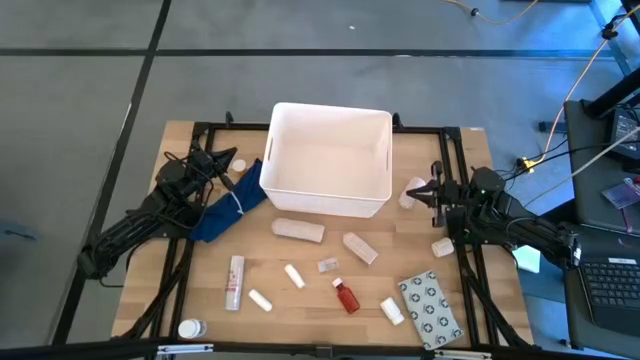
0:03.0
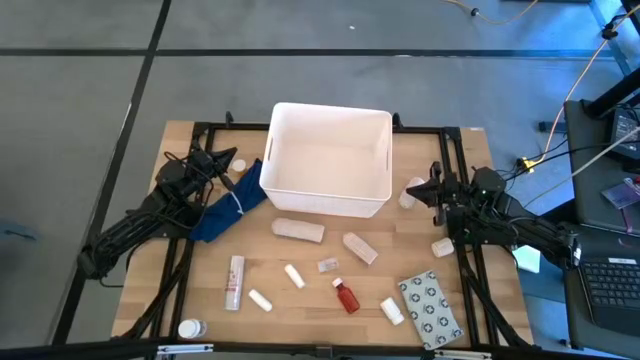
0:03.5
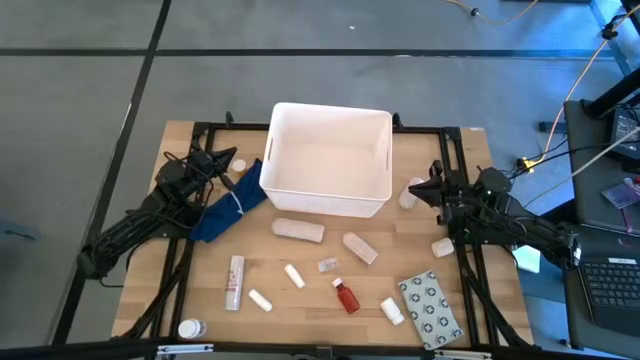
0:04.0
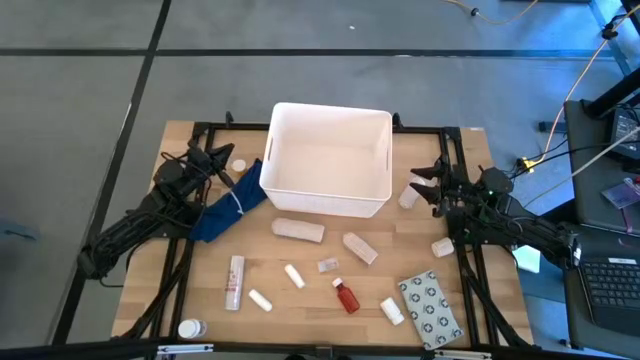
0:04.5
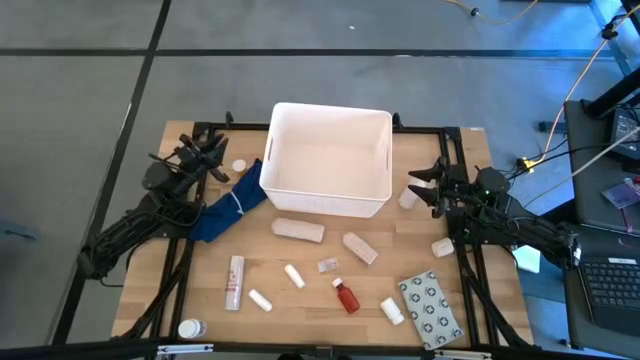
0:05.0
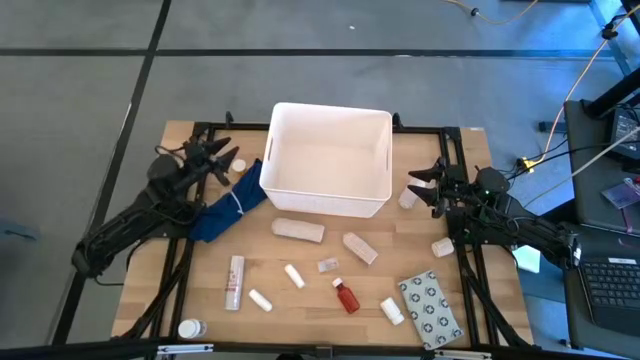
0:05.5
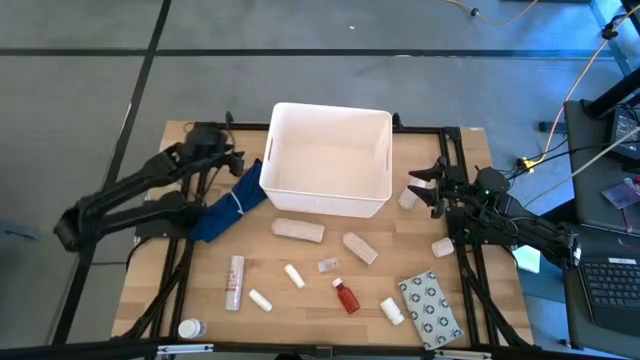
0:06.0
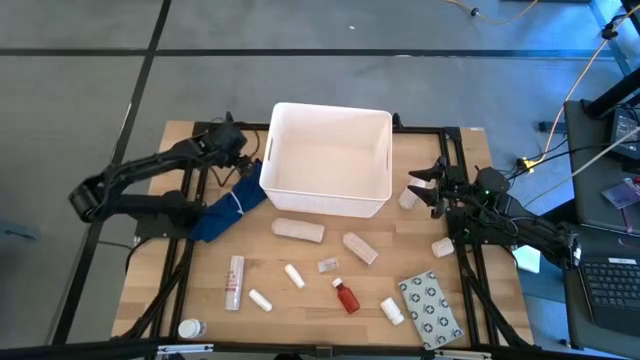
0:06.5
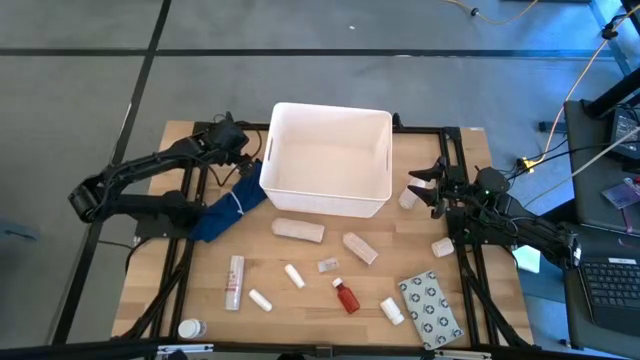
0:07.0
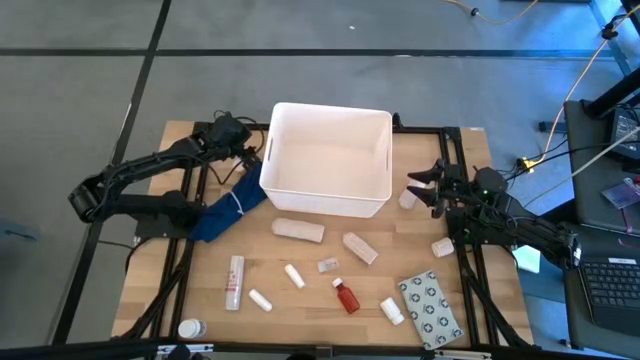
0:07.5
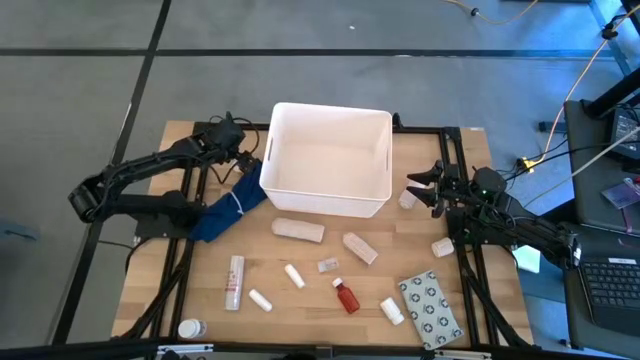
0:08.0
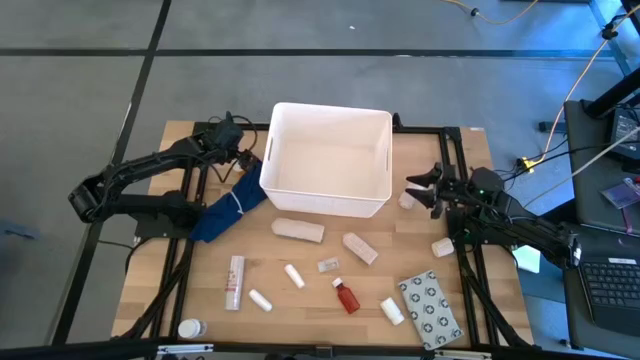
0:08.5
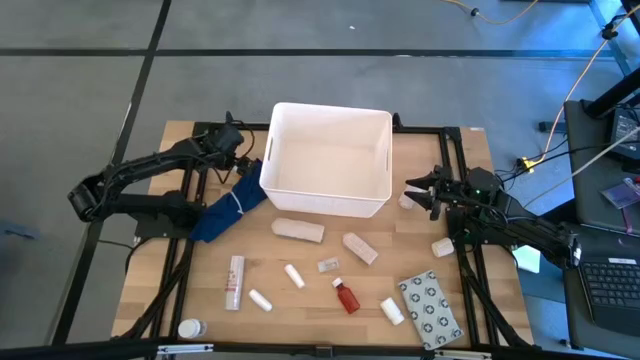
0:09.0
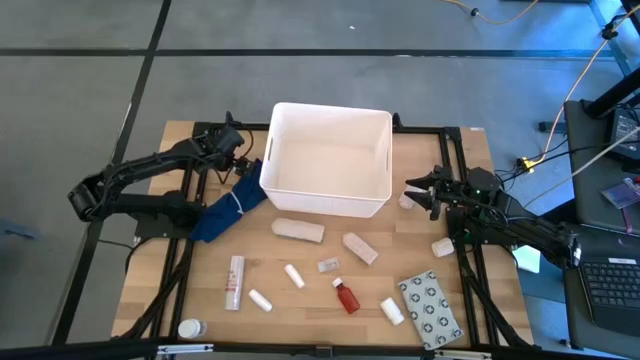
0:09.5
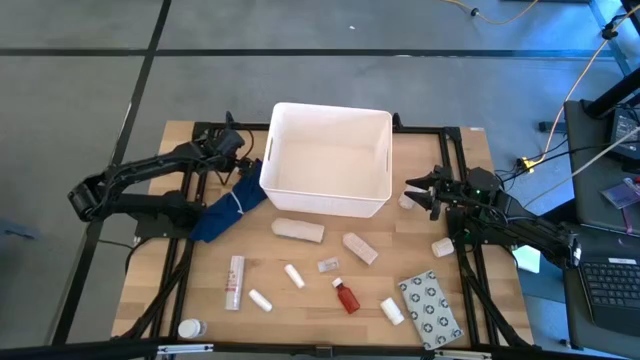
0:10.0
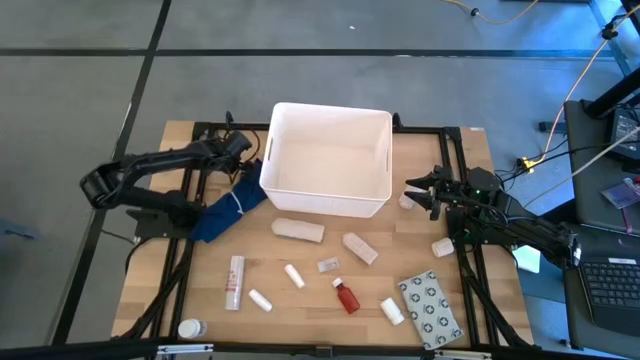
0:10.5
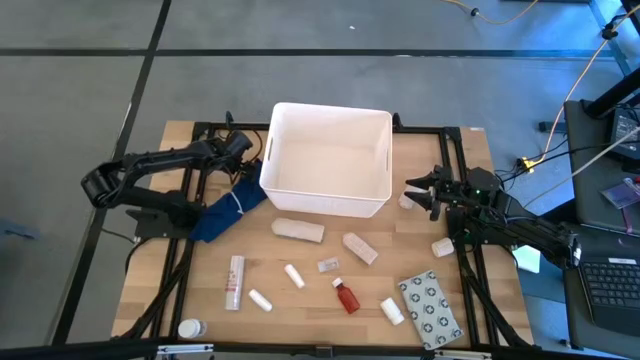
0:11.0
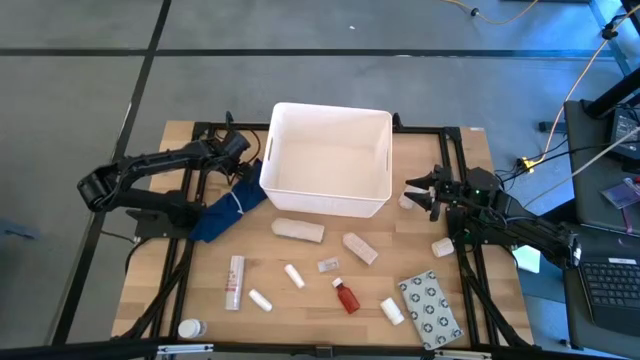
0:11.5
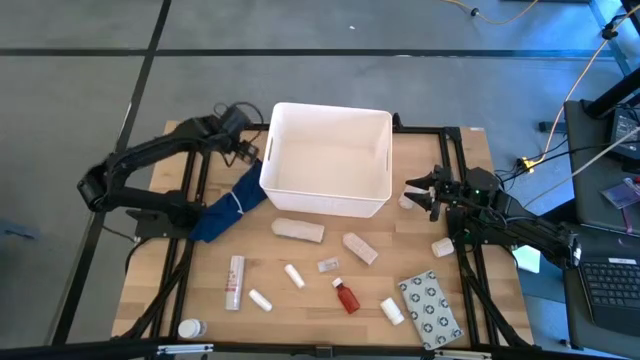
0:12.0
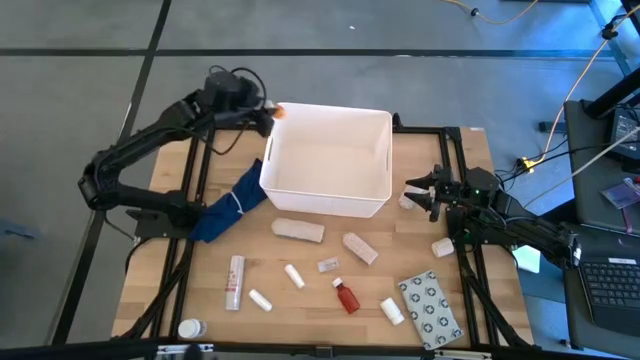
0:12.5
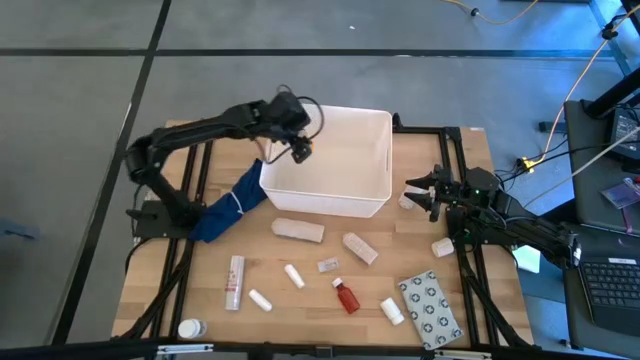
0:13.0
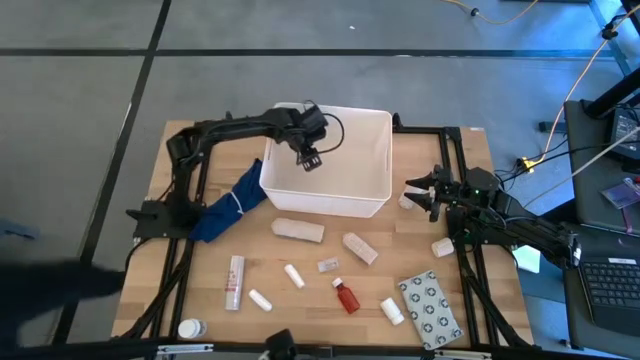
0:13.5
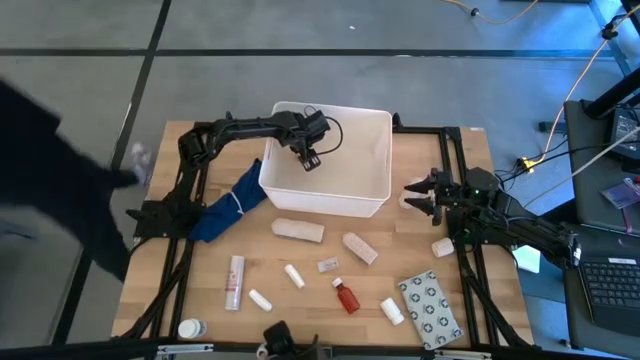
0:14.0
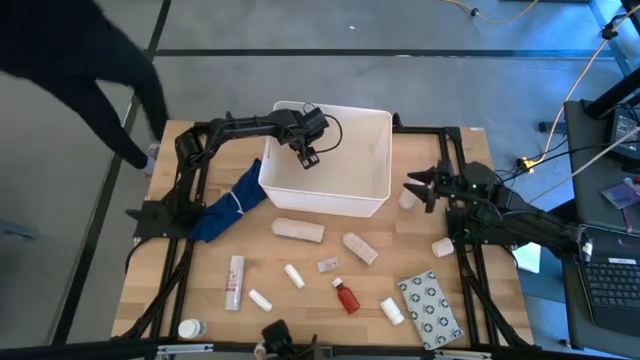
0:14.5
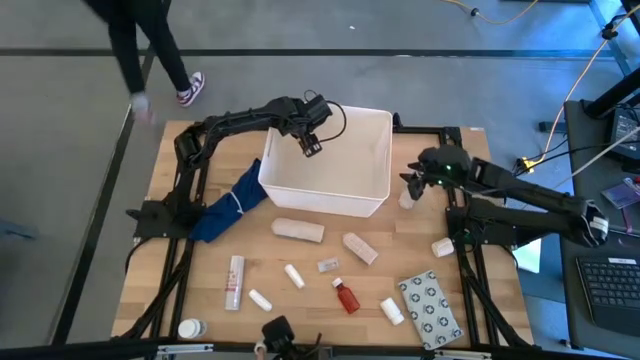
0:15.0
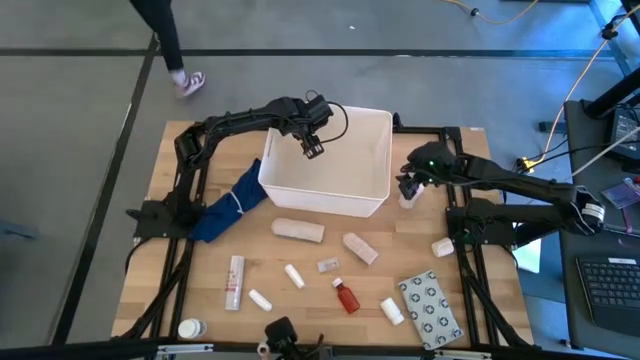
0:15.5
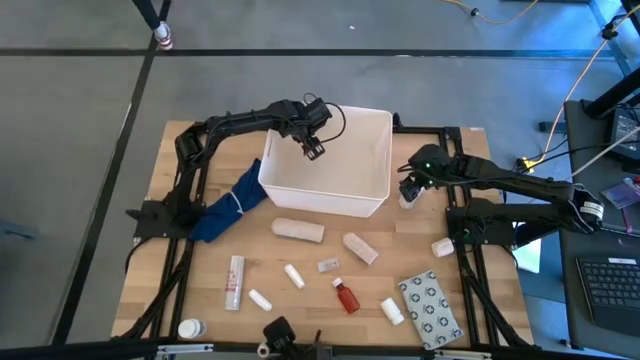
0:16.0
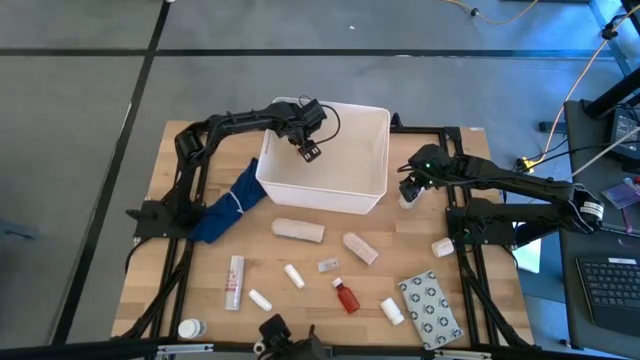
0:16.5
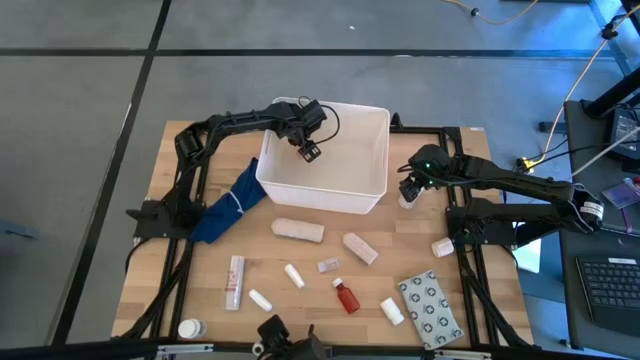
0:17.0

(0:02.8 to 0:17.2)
Task: Pick & place medical supplies in basket/bin
Put the orange pill bottle into the white bin

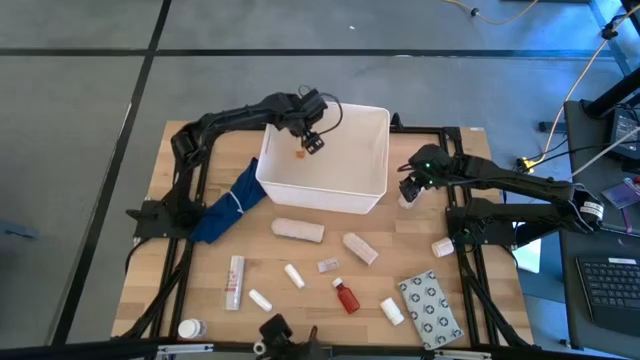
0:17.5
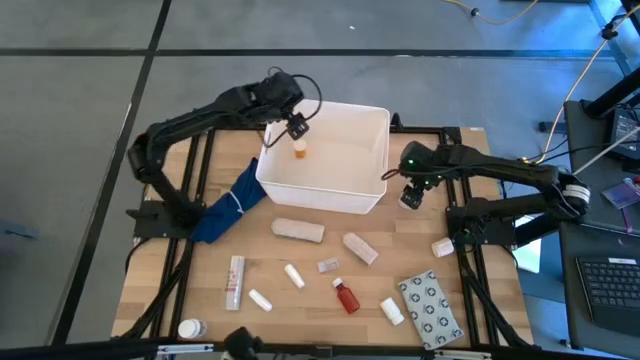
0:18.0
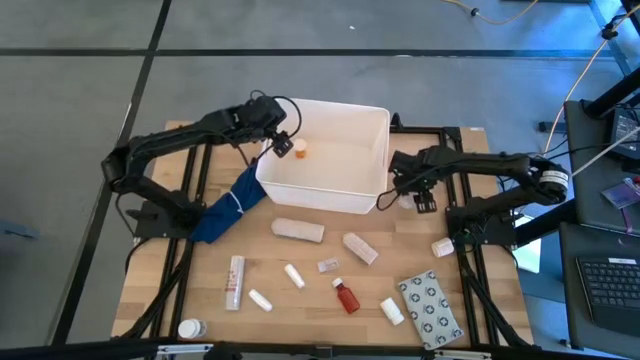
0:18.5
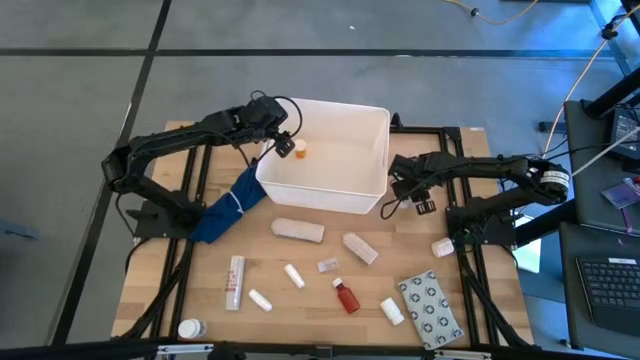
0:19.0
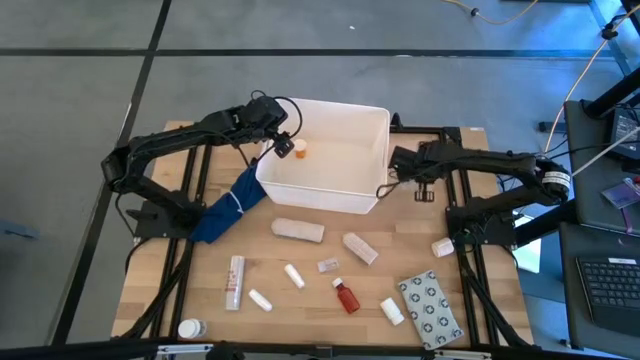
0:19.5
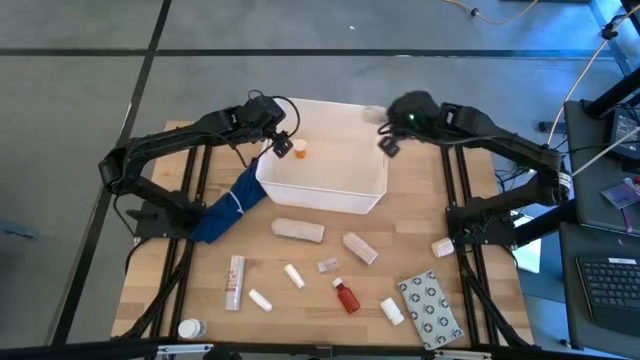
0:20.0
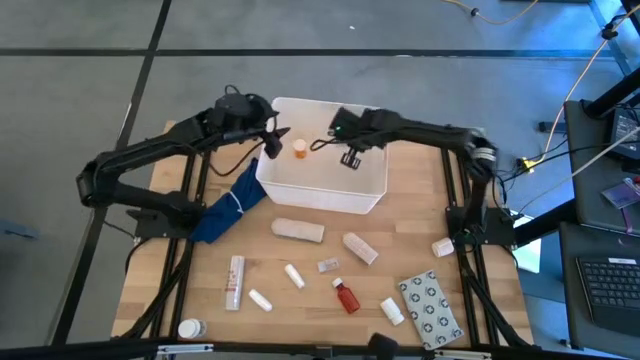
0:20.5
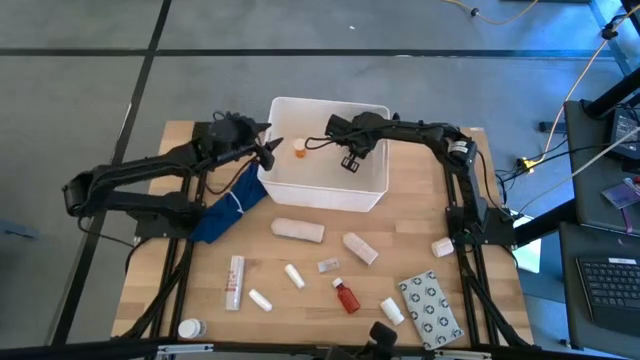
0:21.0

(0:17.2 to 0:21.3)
Put the light brown bandage into the white bin

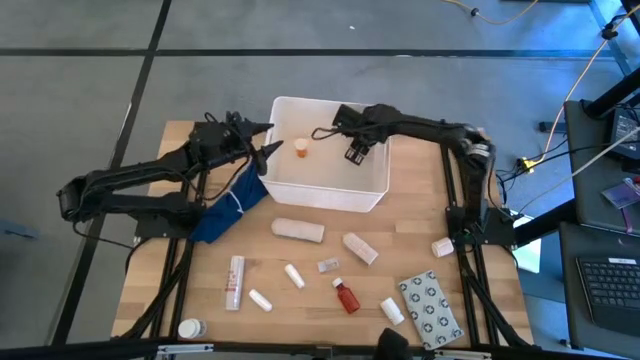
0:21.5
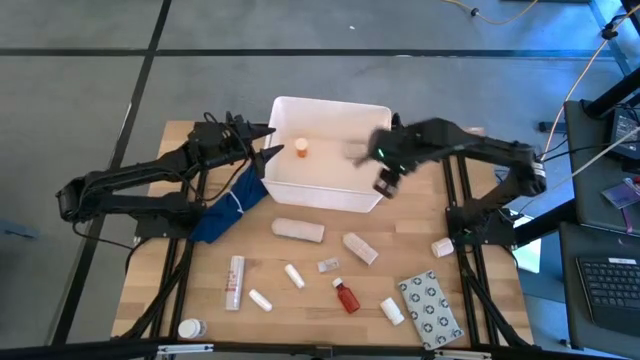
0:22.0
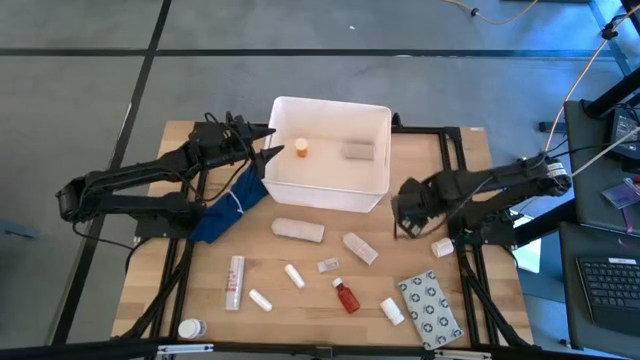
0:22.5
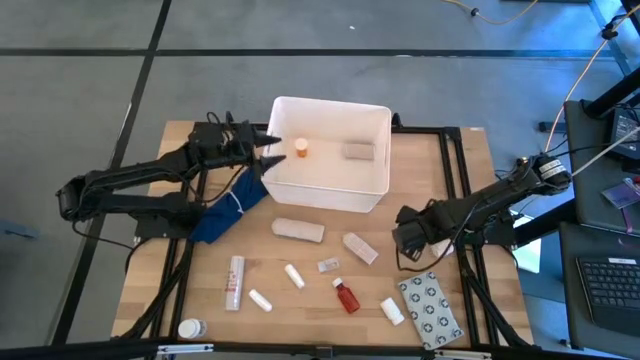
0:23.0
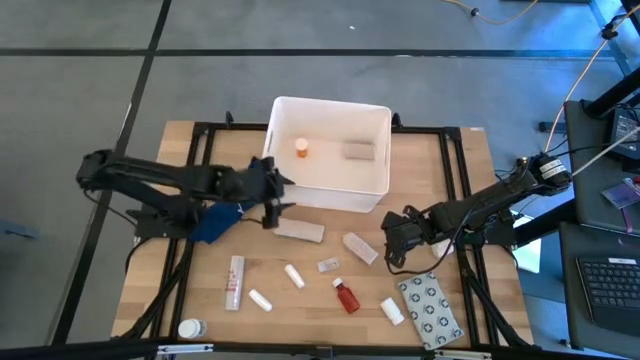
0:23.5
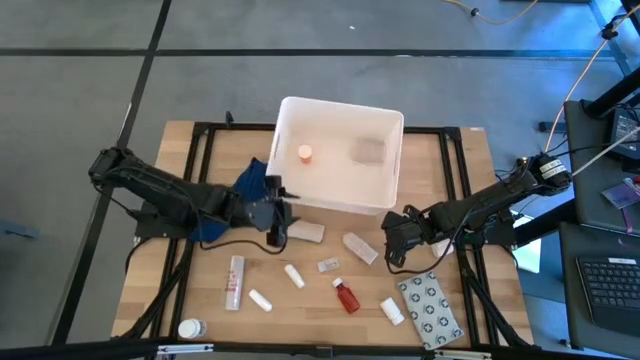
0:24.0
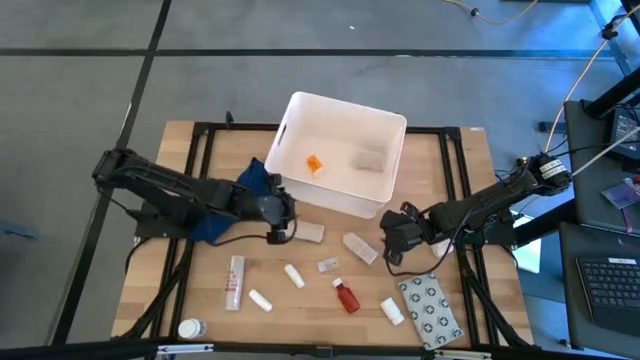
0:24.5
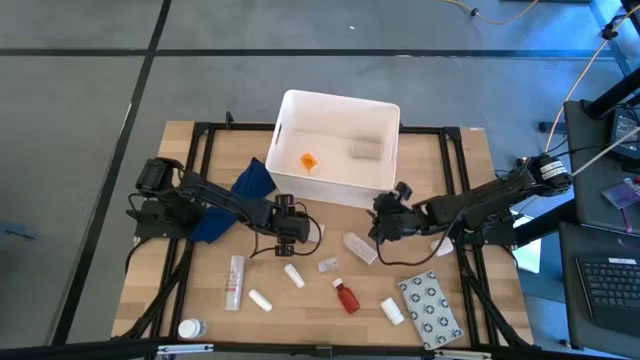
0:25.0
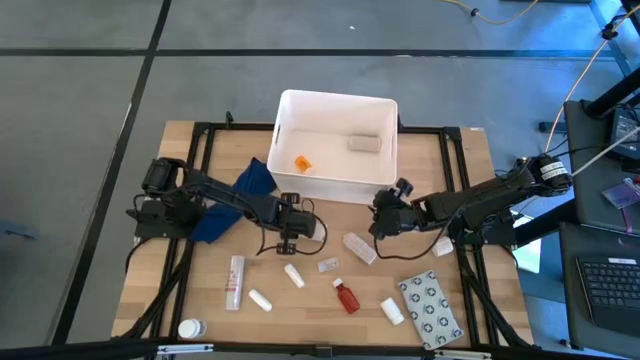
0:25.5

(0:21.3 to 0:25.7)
Adjust the white bin

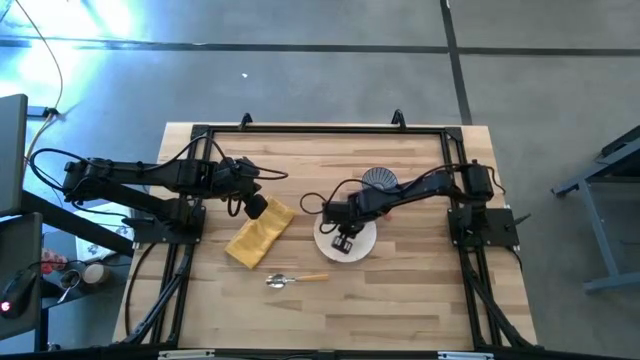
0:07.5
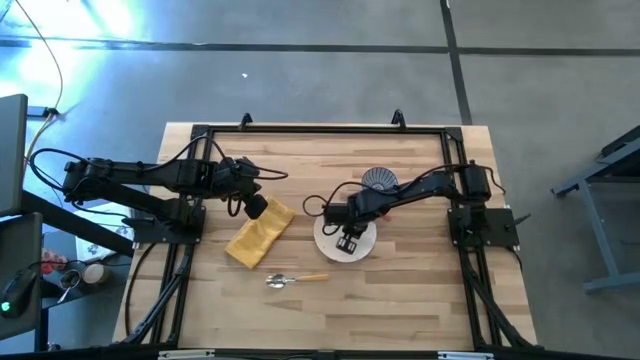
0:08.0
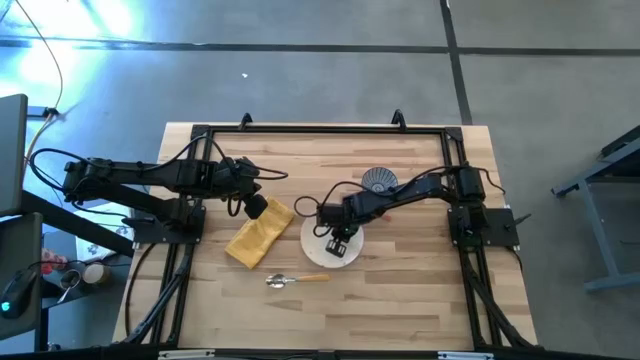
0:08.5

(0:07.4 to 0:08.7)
Task: Set table place
Move the white patterned plate to the center of the table
